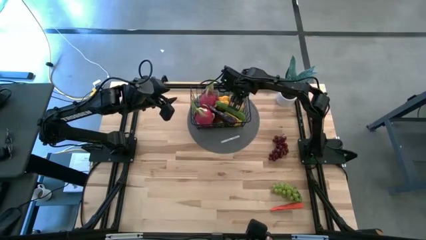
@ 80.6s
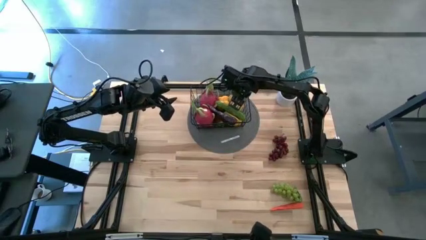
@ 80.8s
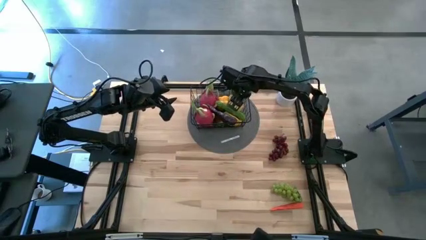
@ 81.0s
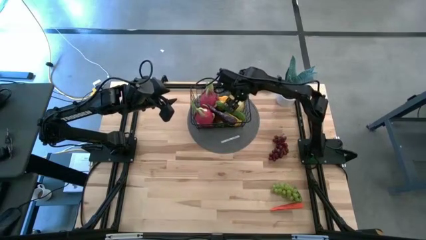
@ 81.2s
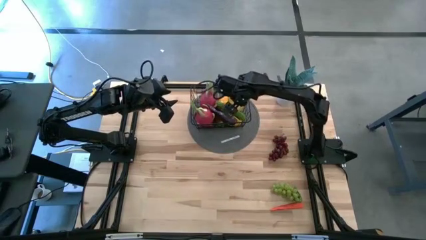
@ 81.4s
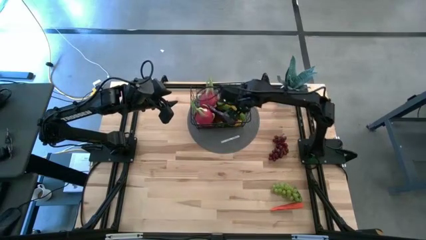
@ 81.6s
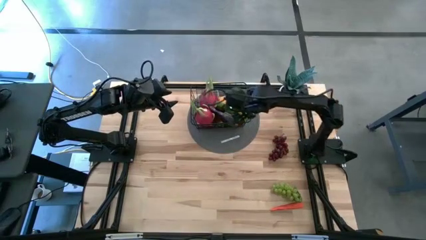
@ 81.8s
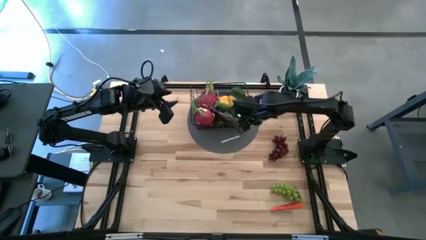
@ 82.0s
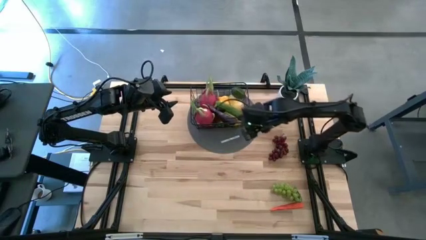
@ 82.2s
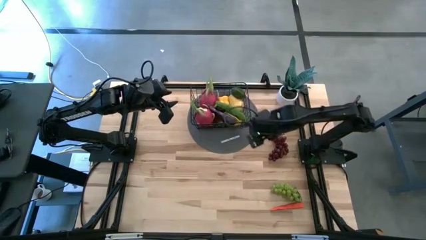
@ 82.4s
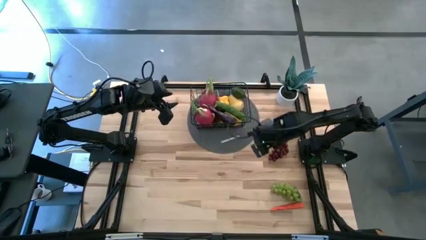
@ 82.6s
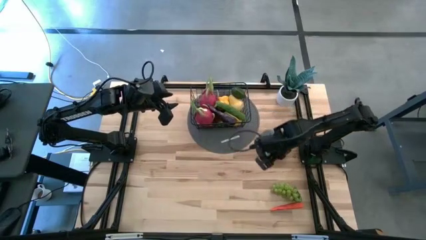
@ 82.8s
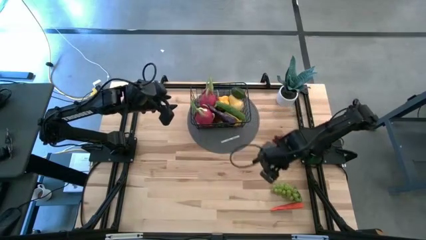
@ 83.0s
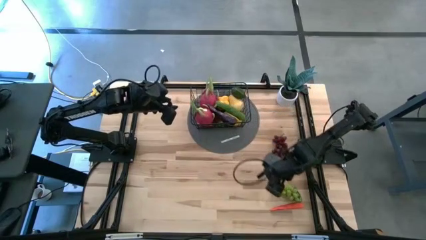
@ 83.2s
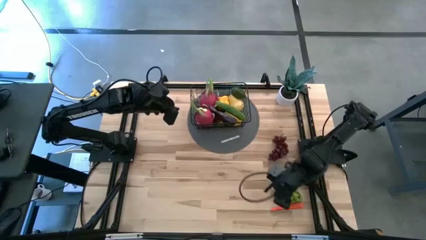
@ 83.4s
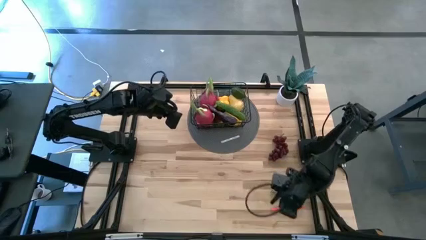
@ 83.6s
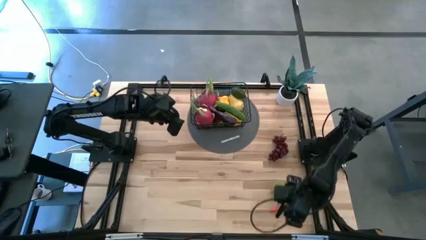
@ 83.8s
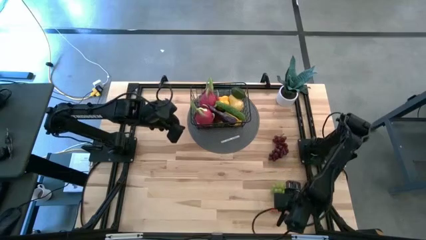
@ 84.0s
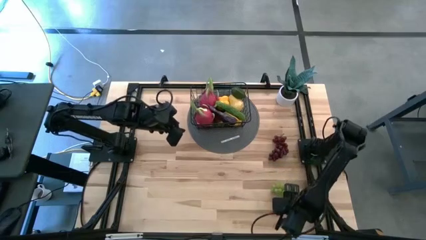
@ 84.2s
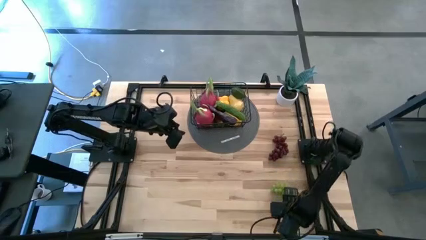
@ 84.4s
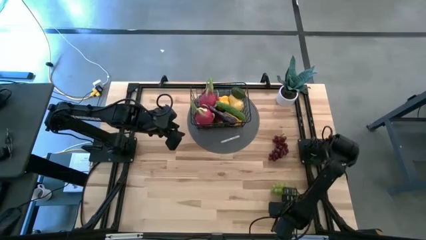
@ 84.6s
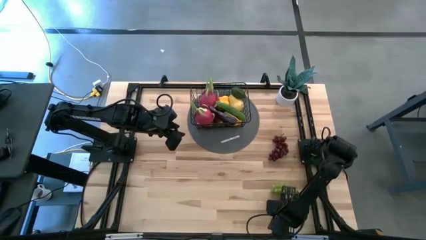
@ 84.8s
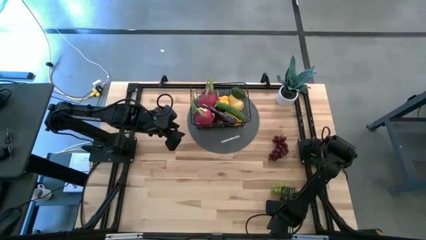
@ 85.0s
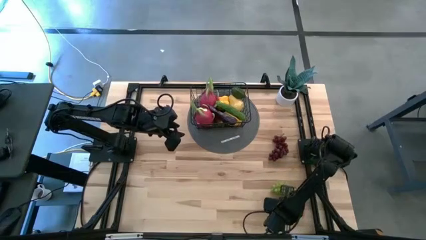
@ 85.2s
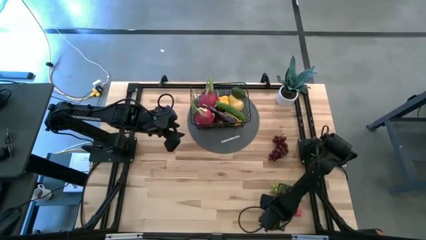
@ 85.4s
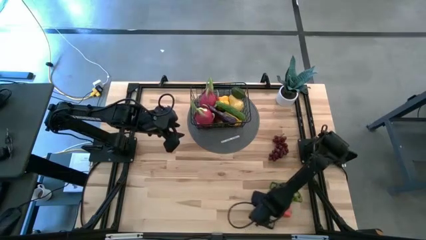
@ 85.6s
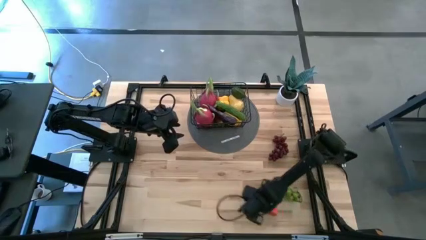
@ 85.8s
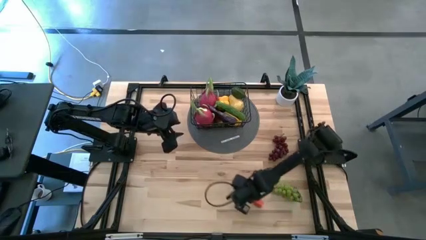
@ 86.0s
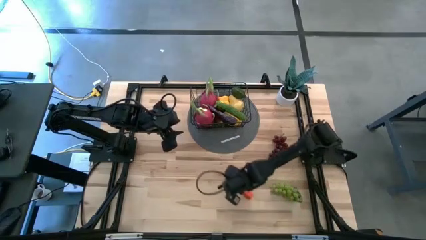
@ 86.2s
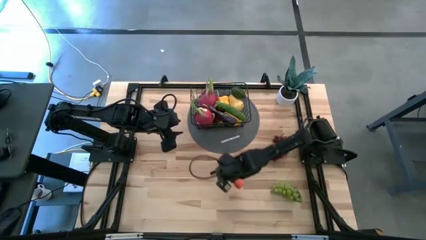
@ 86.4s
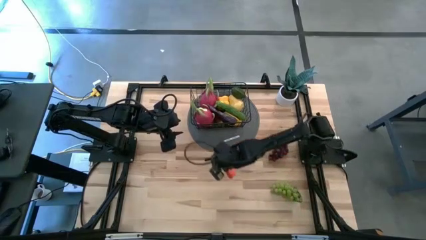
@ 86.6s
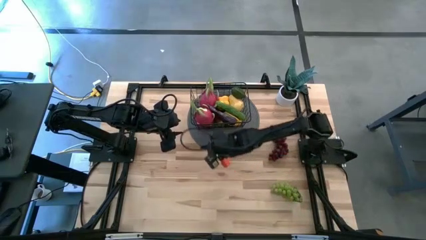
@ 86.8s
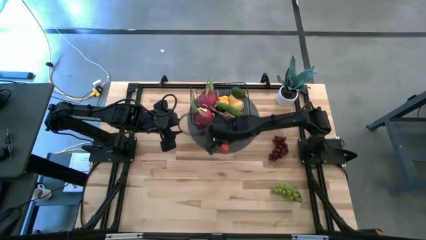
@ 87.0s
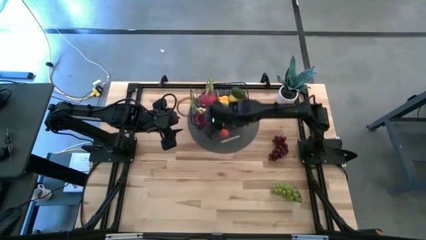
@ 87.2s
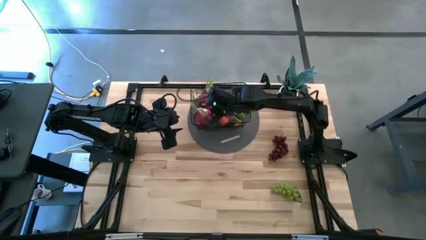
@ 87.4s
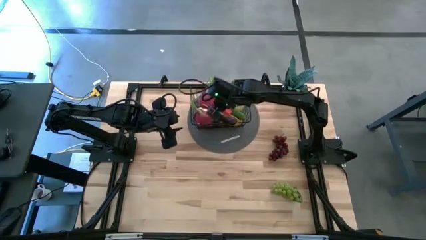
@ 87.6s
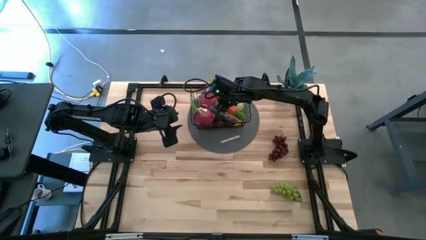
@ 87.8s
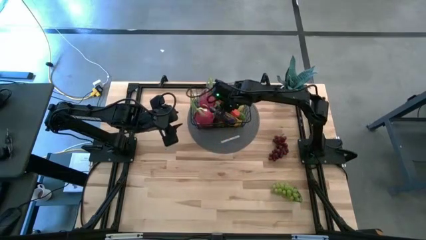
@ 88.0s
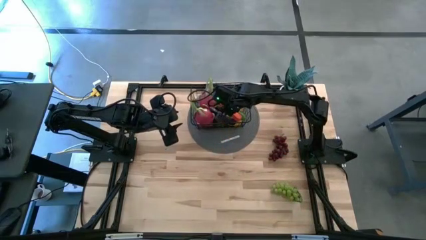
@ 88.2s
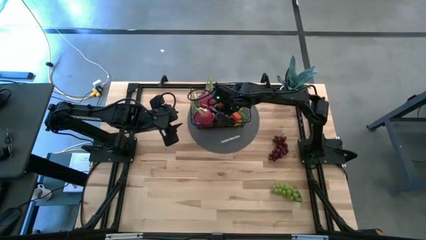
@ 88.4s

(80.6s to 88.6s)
Task: Build produce basket
Put the orange carrot into the black wire basket

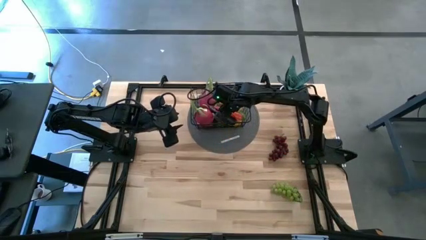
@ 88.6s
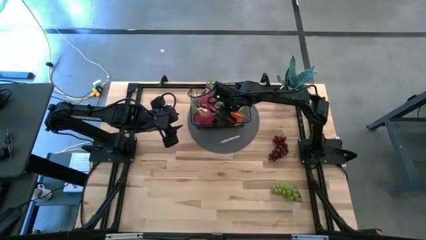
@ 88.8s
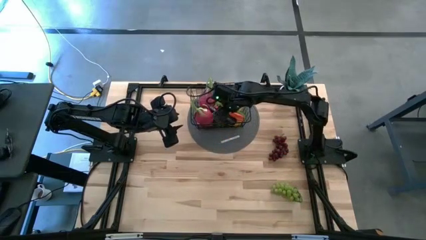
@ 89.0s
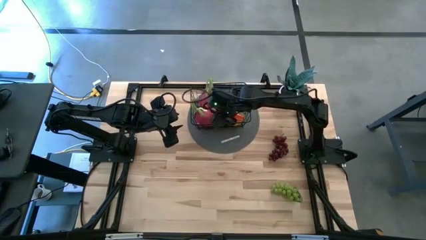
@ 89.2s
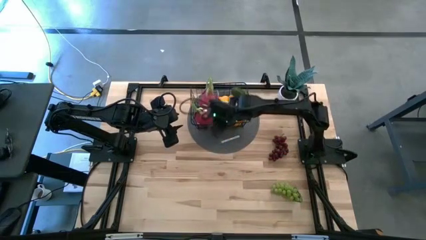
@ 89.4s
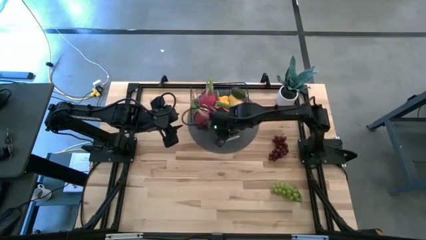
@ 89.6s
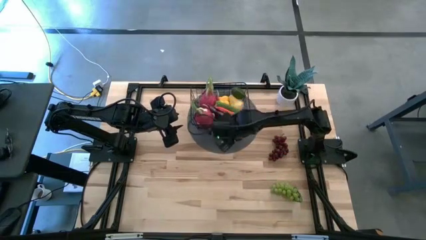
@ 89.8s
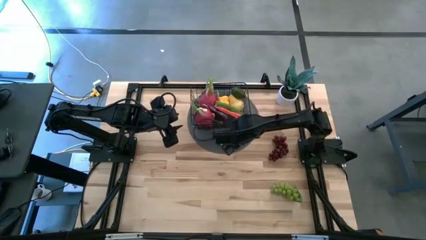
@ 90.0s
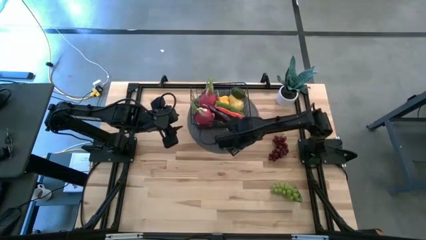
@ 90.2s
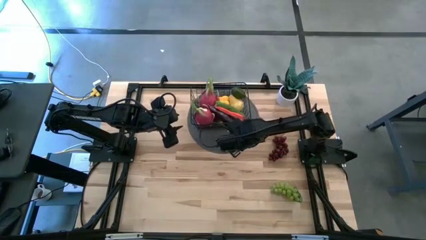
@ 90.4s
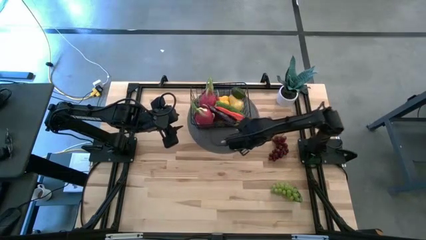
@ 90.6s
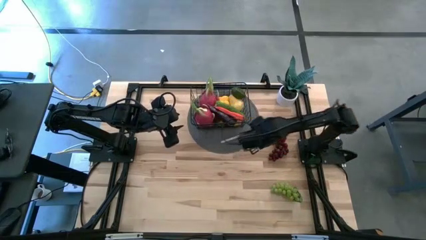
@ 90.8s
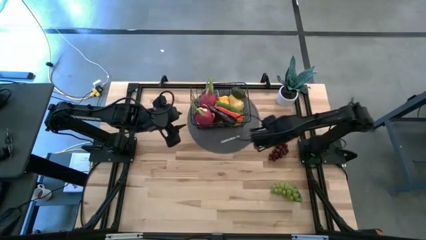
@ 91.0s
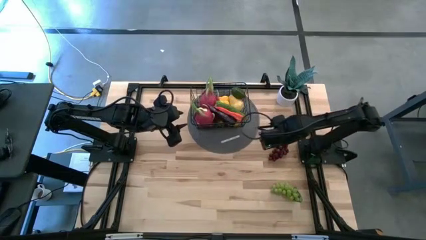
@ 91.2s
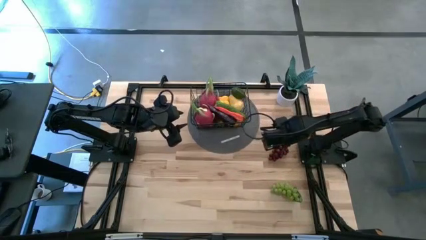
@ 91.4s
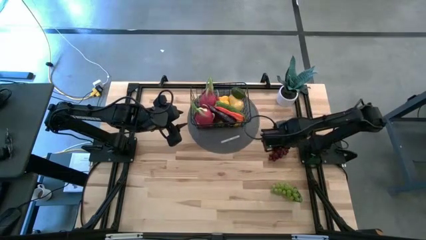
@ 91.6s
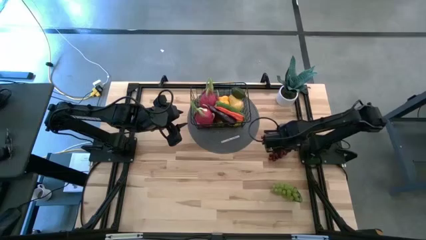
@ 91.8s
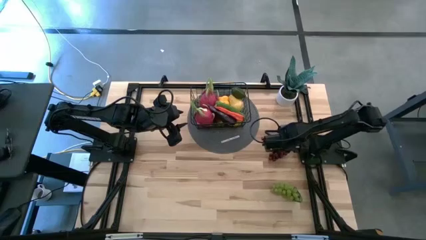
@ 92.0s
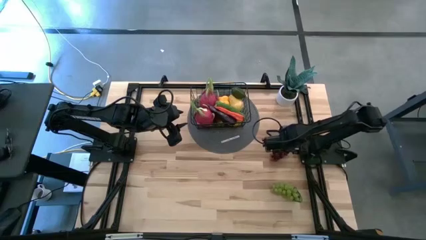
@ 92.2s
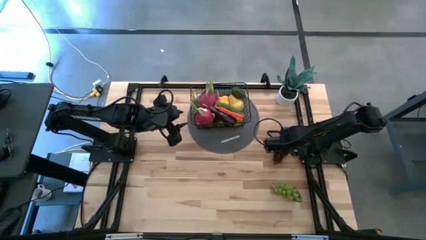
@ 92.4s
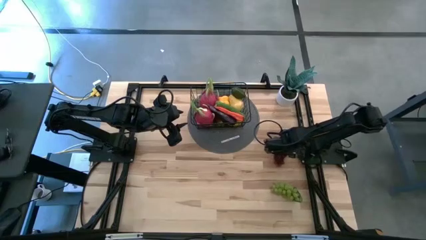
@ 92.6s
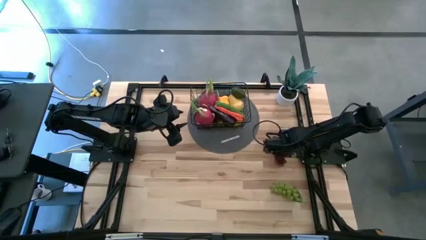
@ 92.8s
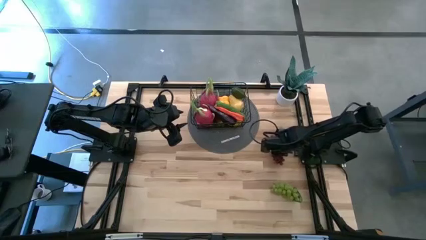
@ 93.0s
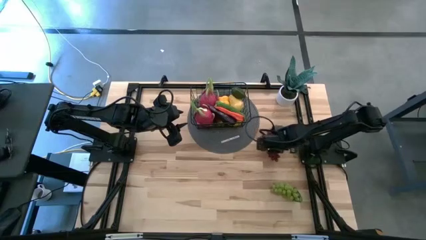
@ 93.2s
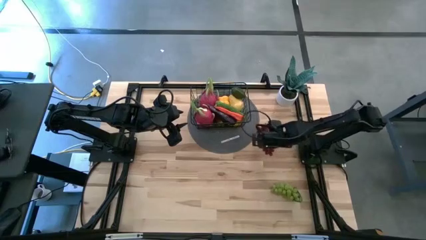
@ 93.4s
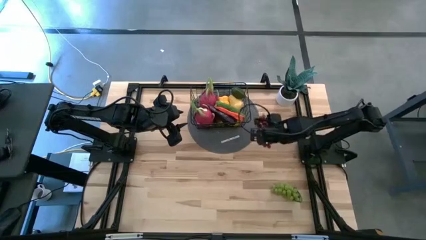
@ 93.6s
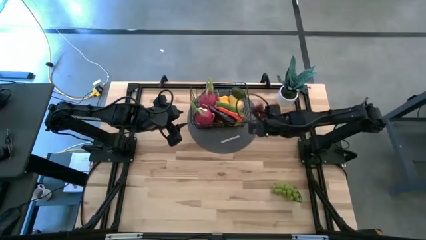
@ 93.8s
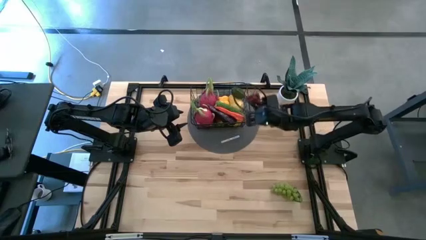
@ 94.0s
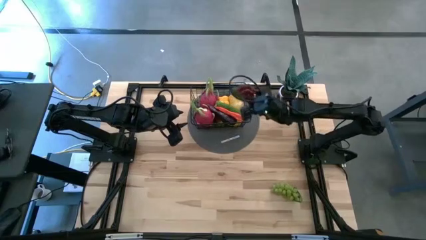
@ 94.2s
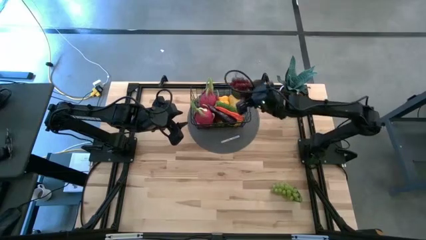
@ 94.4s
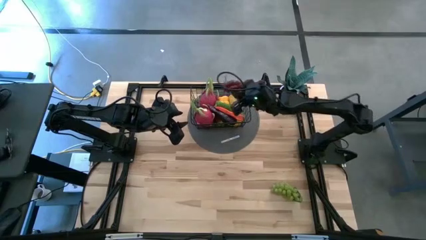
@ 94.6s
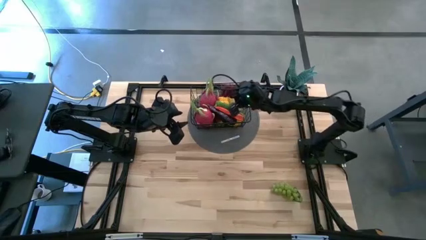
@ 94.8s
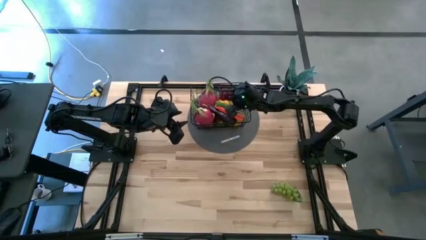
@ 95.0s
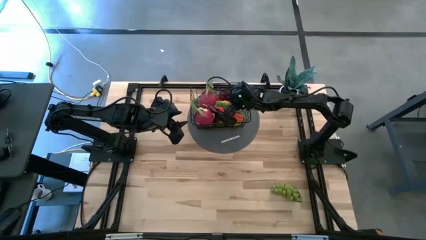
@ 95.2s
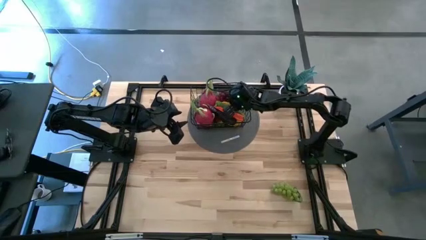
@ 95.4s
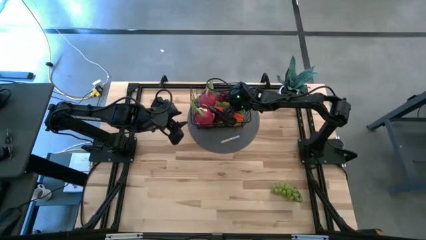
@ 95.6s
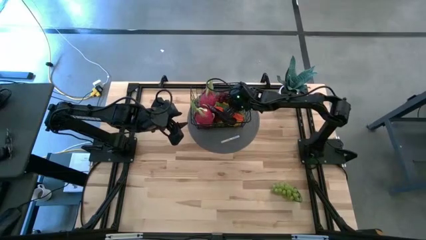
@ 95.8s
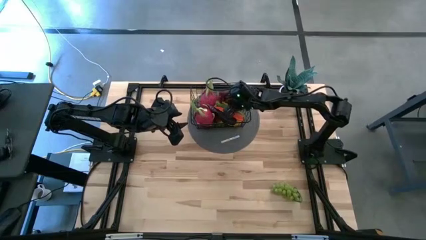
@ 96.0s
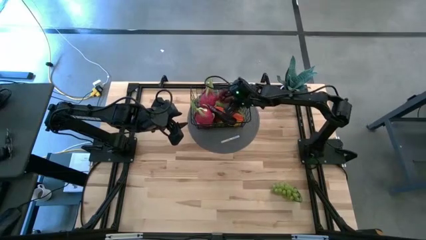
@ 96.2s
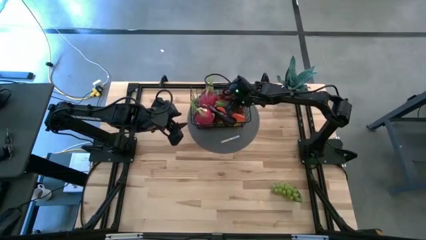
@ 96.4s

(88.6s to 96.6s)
Put the red grapes into the black wire basket
